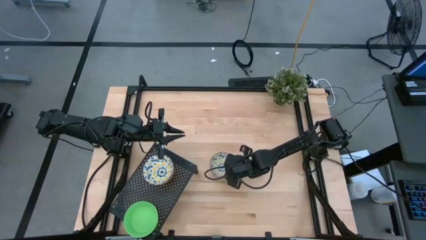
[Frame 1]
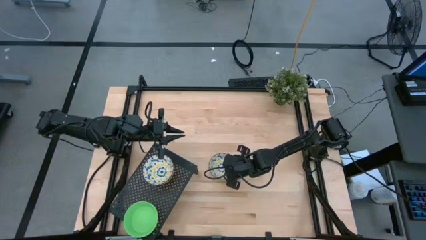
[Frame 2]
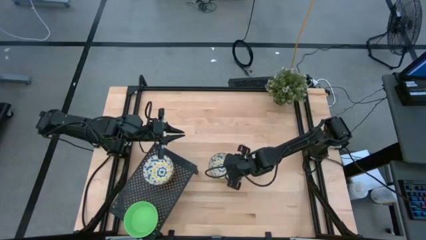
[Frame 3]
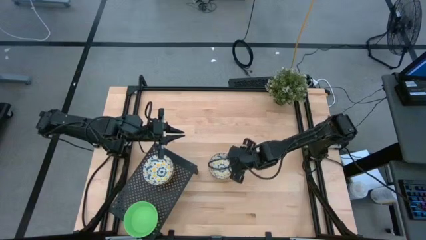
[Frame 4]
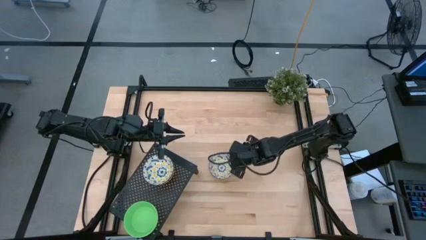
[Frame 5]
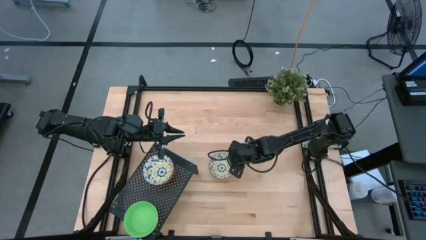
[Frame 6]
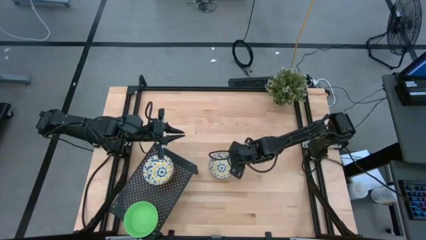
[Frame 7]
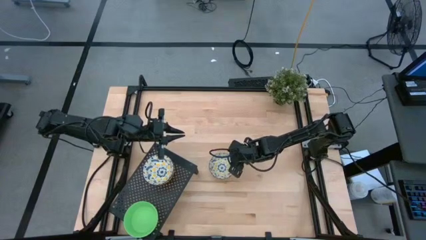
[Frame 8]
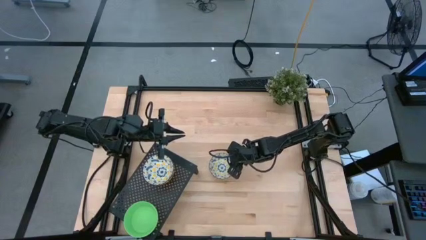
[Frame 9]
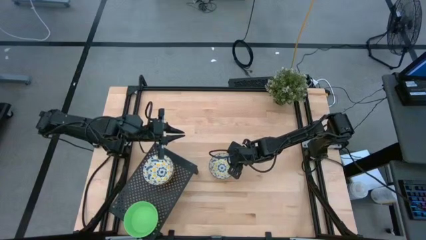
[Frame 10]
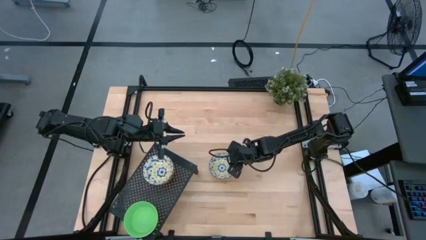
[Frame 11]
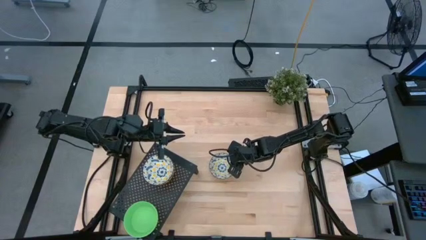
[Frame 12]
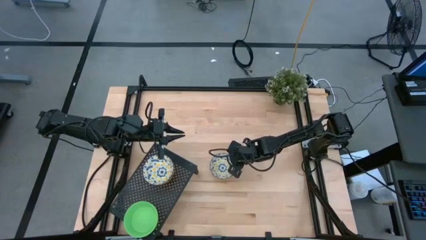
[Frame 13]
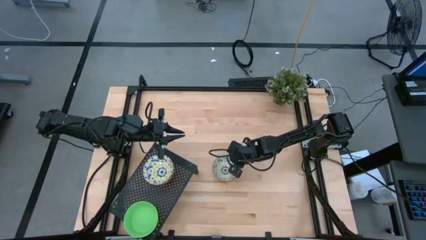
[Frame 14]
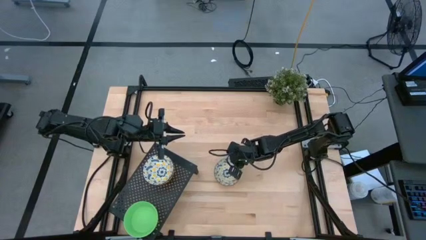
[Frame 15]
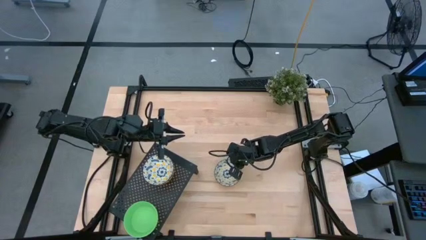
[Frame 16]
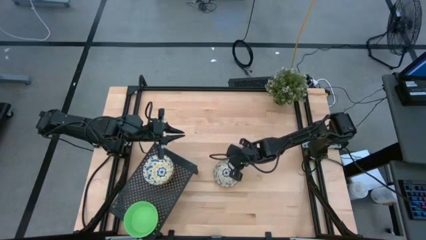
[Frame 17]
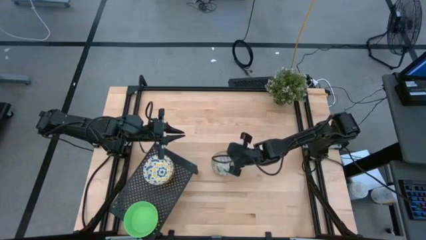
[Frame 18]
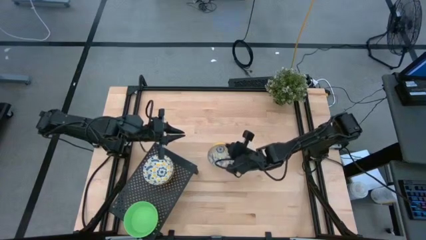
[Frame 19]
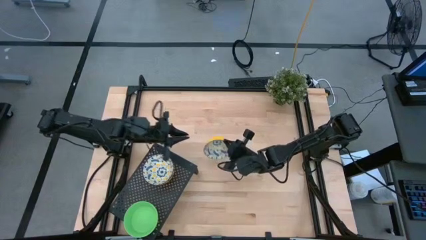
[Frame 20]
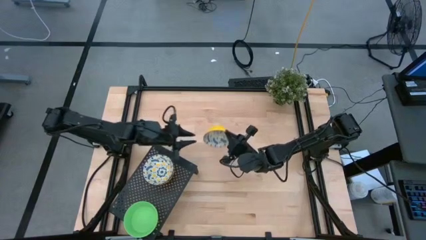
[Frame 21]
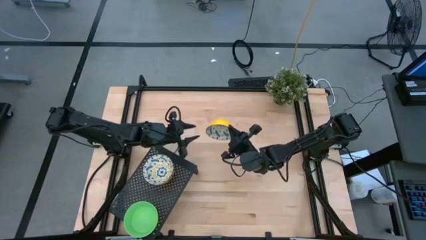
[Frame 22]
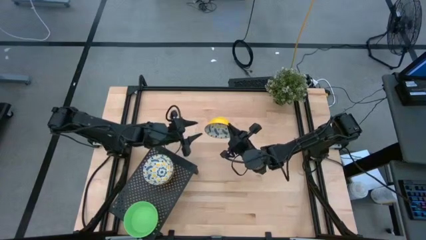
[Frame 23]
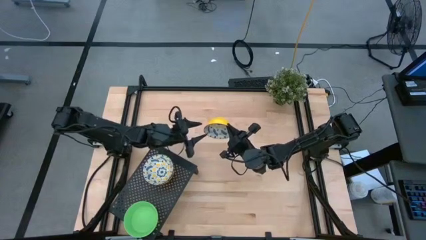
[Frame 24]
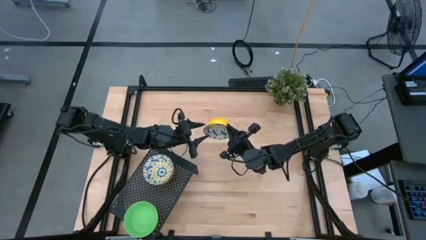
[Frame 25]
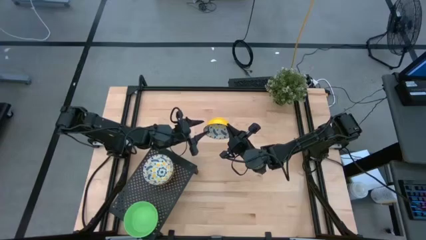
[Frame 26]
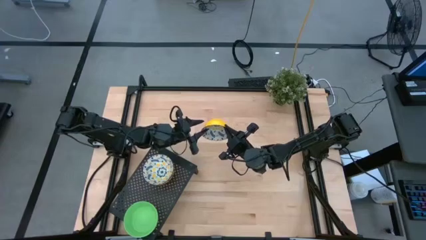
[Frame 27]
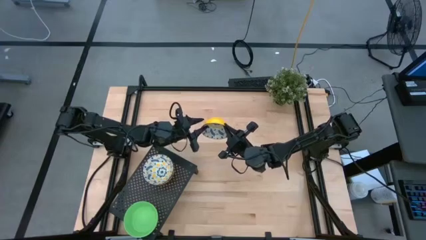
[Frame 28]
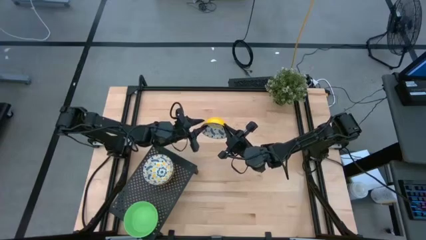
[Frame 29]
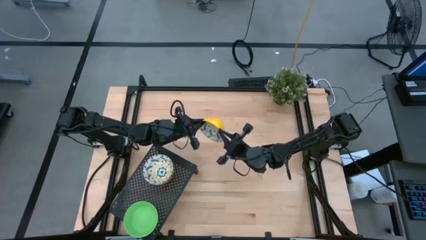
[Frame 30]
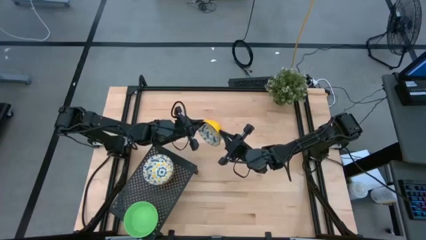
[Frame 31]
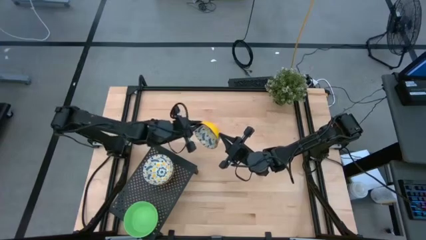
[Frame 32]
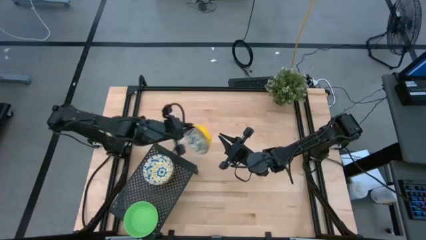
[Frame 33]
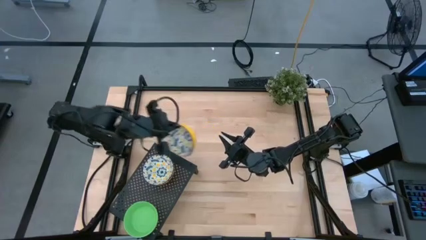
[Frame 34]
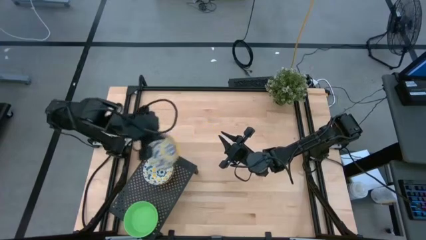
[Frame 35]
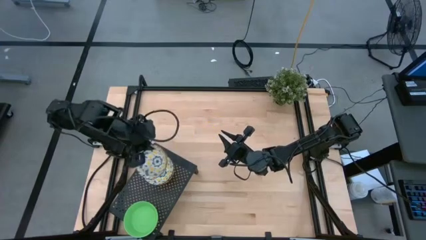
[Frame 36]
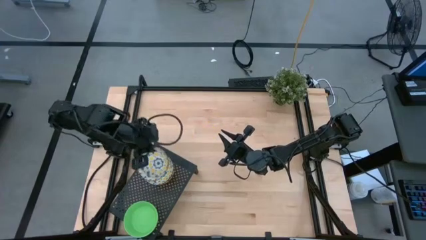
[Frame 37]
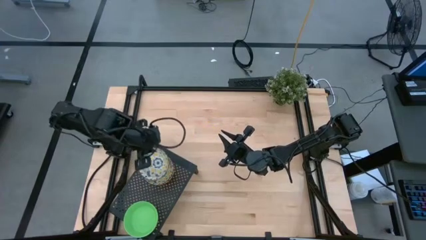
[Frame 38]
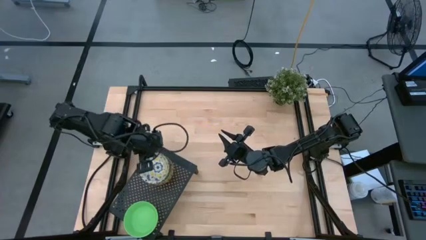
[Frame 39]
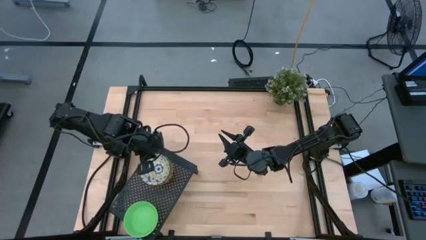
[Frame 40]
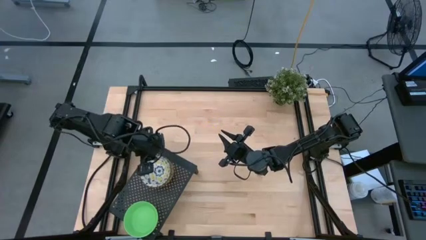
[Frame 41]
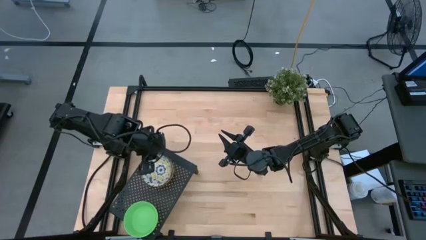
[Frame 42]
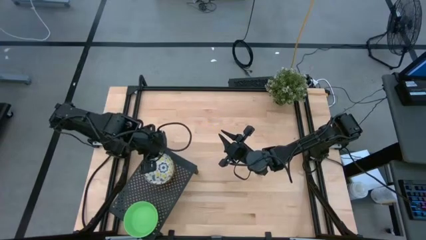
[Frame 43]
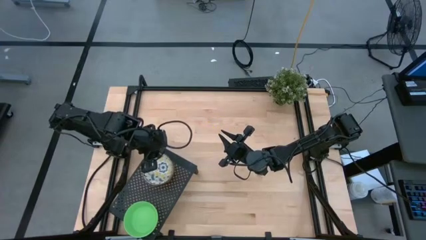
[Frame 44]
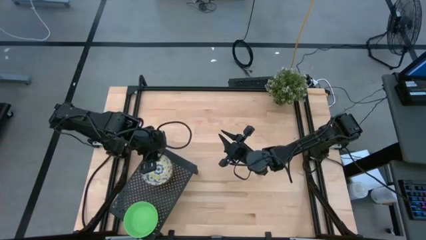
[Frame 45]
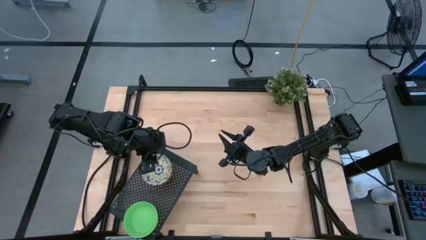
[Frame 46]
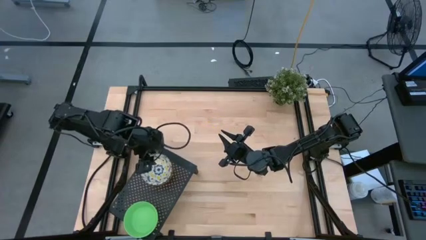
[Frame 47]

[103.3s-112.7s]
Task: Pick & Place Mini bowls
Stack the yellow patterned bowl on the yellow patterned bowls on the shelf

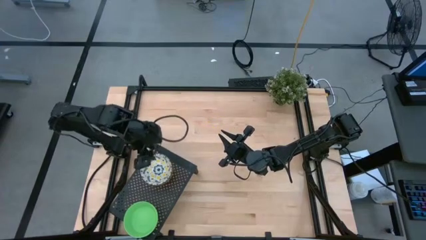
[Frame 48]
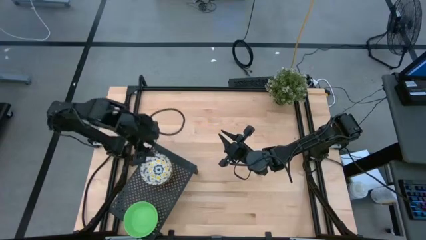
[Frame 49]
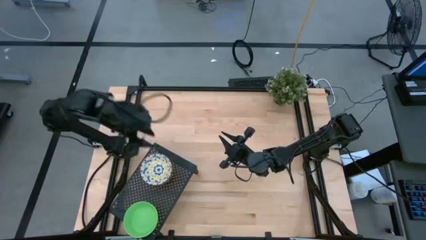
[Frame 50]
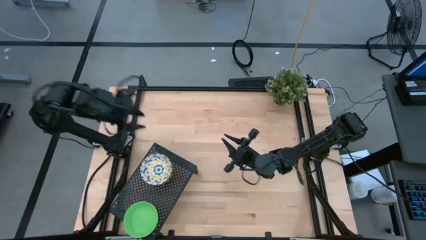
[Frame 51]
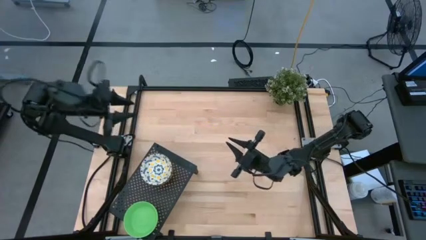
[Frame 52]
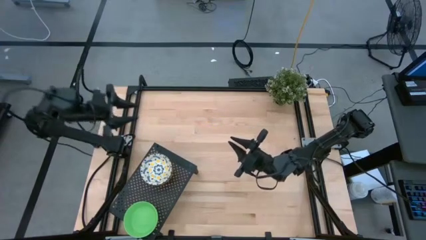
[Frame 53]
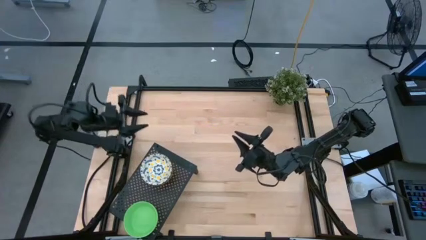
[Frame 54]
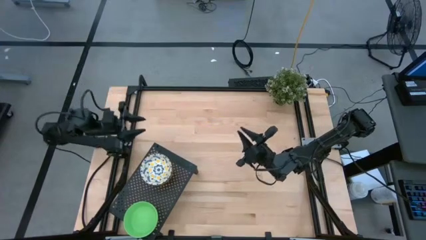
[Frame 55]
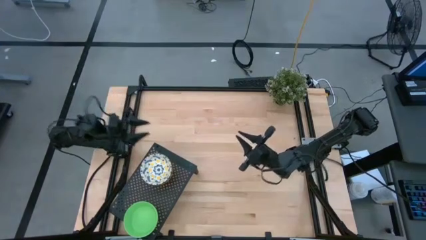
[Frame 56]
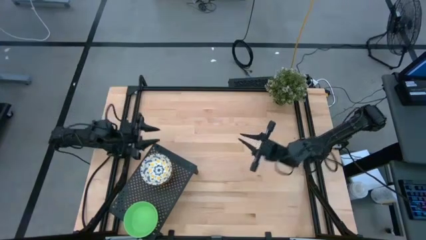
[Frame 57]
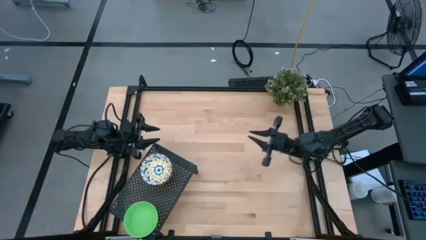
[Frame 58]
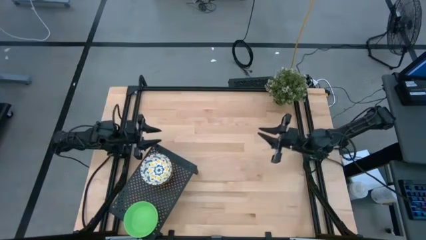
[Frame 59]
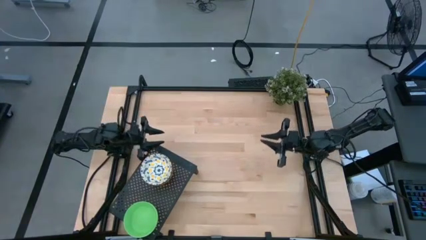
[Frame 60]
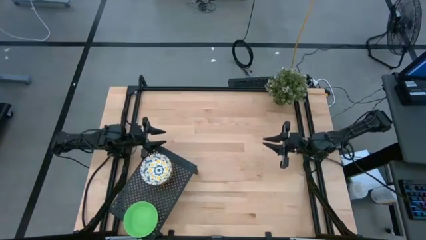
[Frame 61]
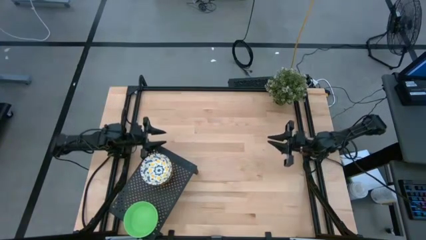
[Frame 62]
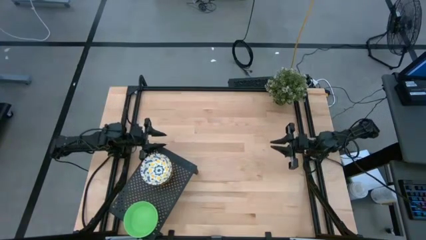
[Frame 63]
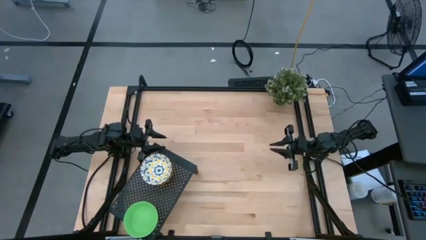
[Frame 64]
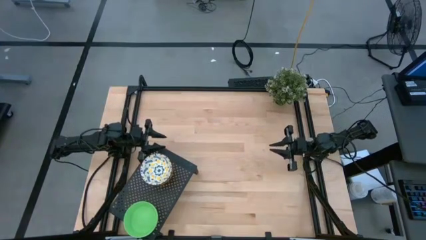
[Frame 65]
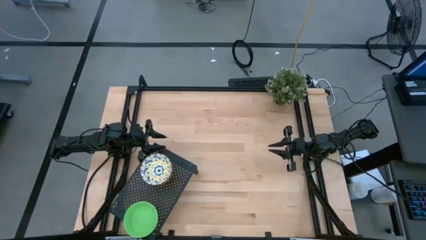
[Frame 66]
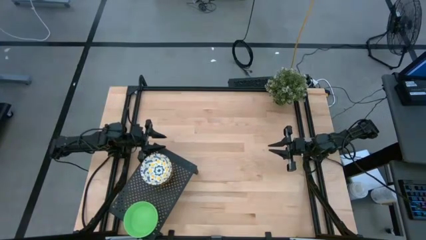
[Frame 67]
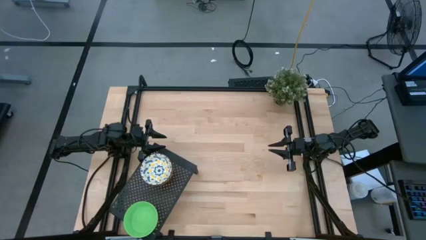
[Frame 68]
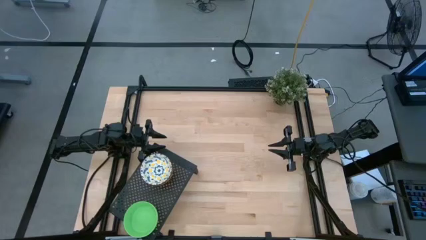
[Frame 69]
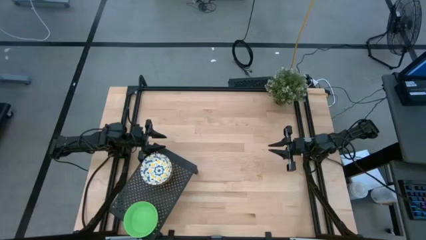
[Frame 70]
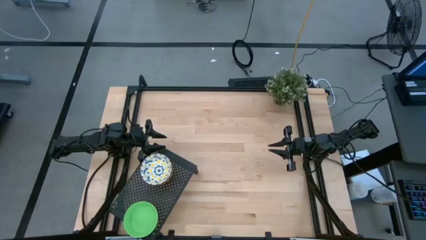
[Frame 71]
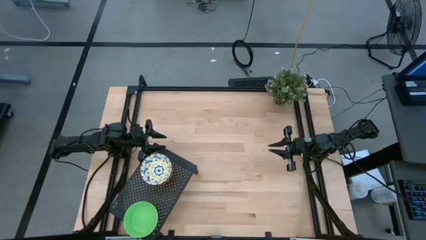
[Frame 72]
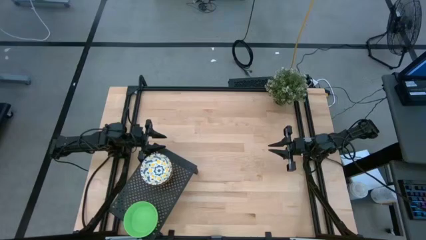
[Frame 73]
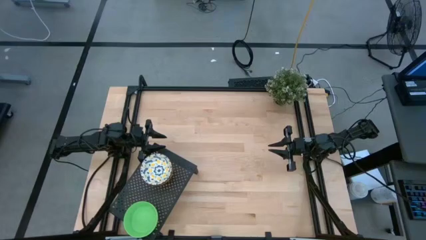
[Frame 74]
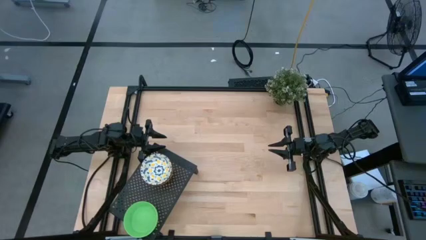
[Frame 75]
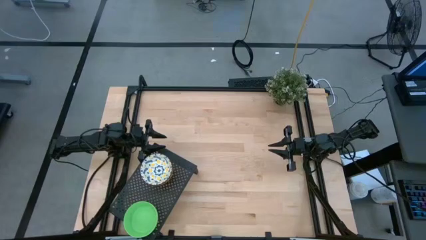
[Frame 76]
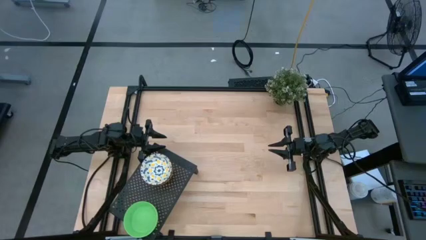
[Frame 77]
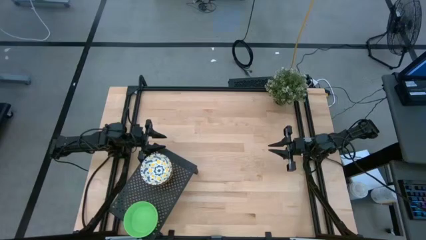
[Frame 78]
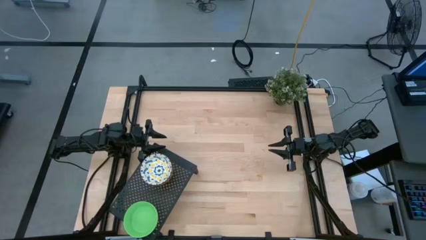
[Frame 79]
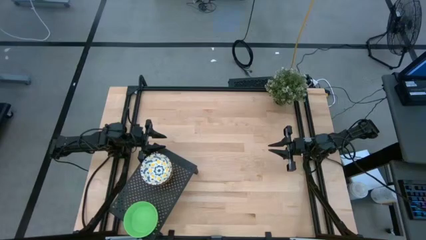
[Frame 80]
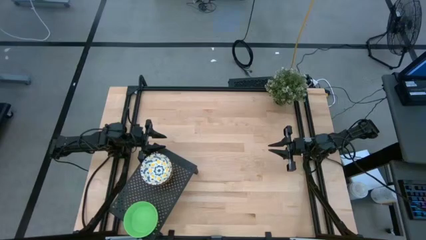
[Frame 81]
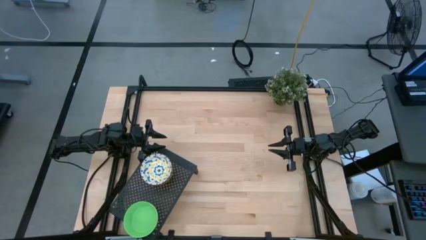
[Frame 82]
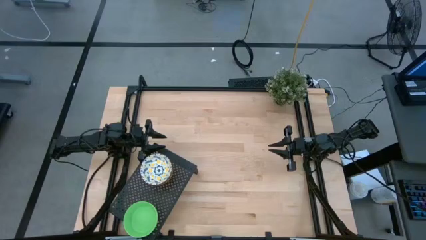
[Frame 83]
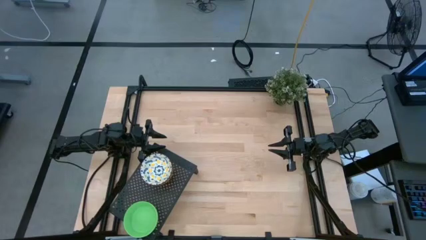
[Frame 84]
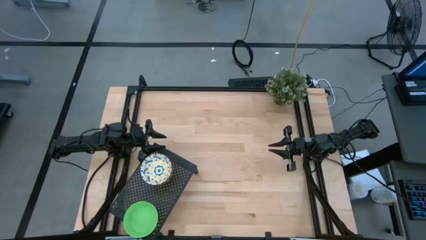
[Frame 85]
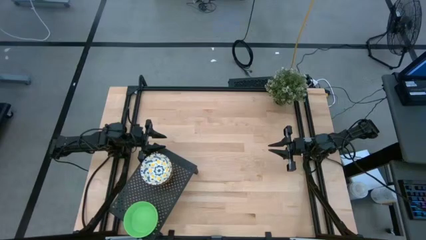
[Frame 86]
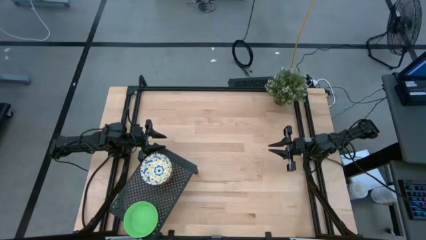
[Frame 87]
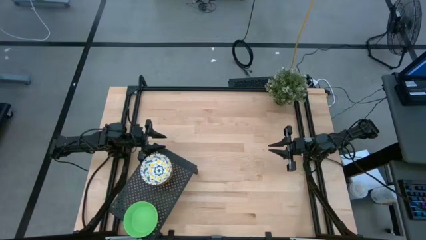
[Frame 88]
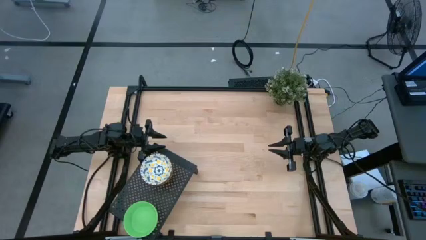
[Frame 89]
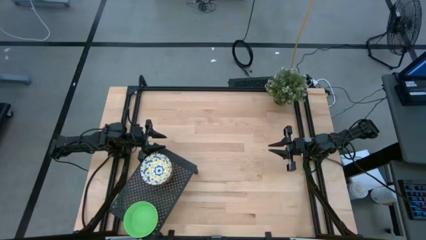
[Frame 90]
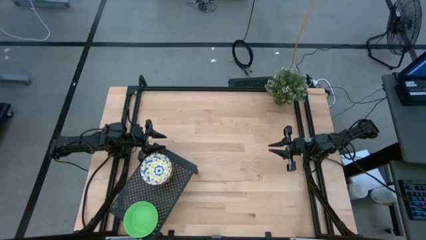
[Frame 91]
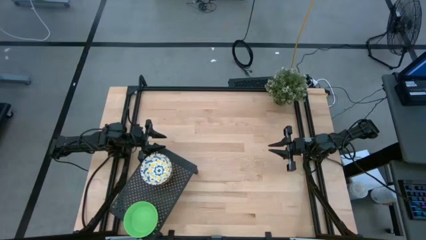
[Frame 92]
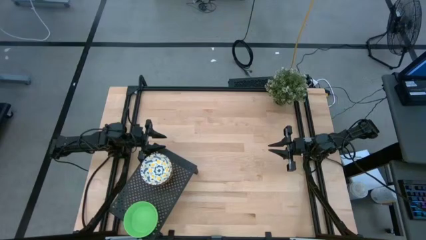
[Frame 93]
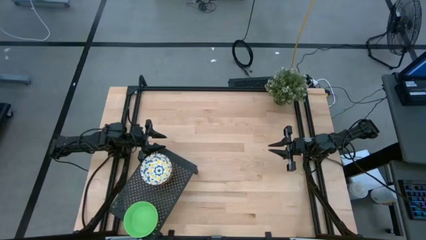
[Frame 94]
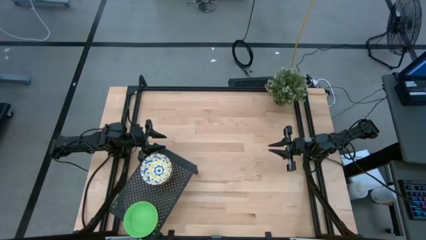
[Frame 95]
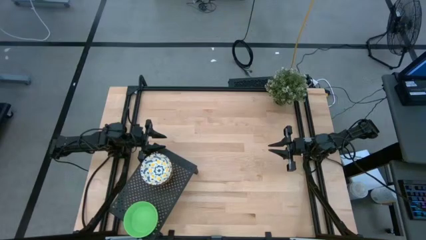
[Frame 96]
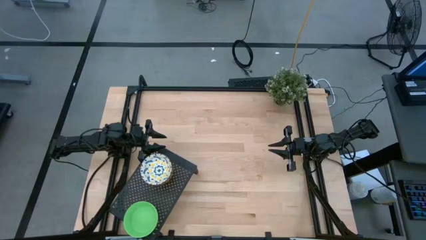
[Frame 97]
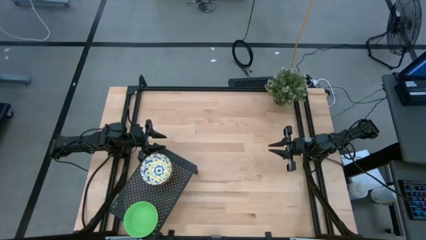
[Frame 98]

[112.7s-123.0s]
Return to Home Position
